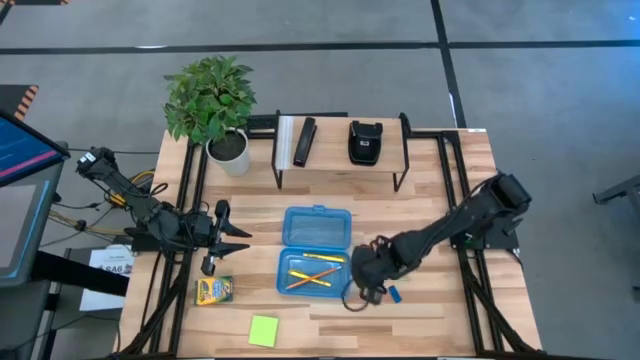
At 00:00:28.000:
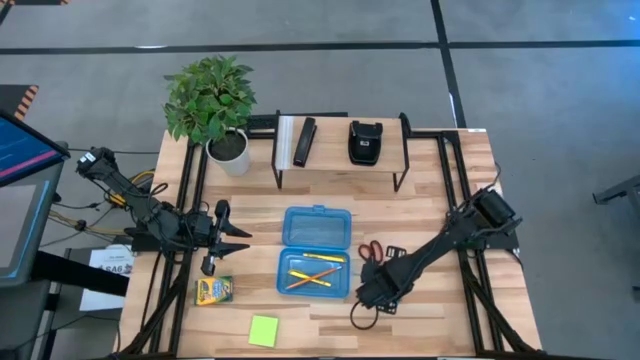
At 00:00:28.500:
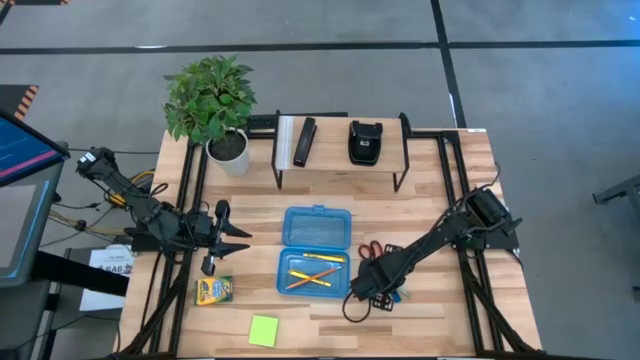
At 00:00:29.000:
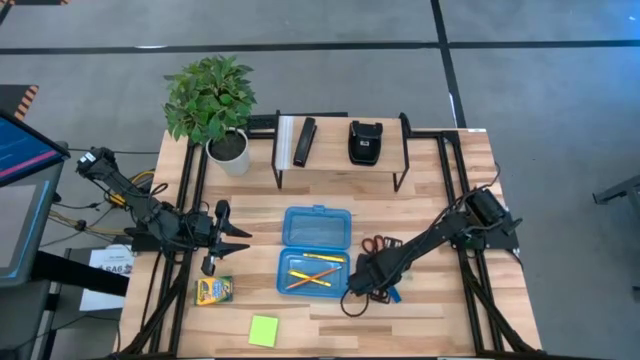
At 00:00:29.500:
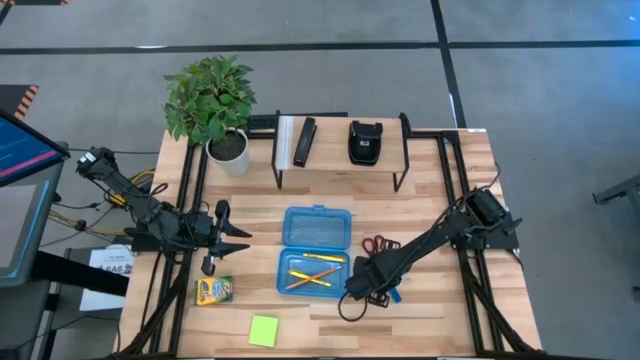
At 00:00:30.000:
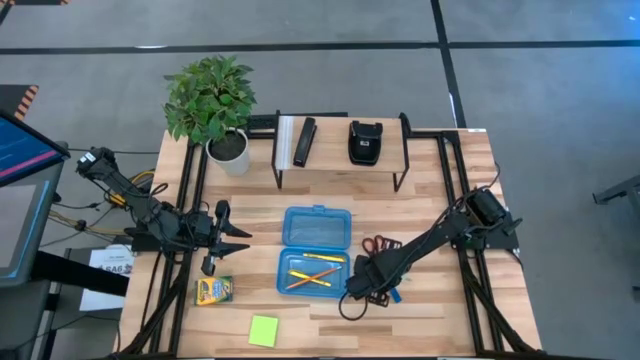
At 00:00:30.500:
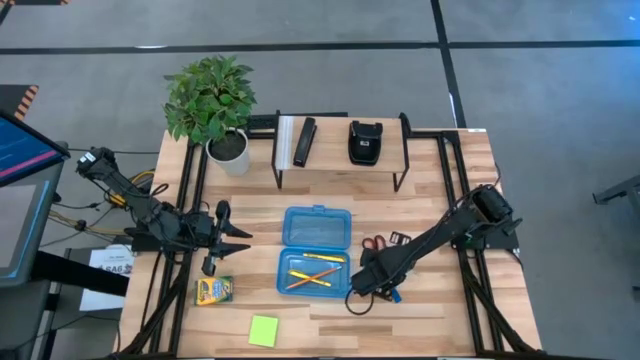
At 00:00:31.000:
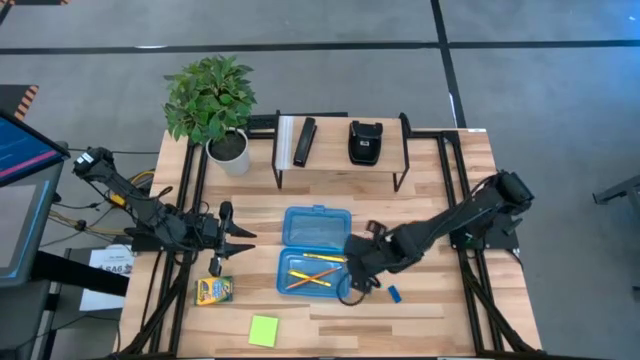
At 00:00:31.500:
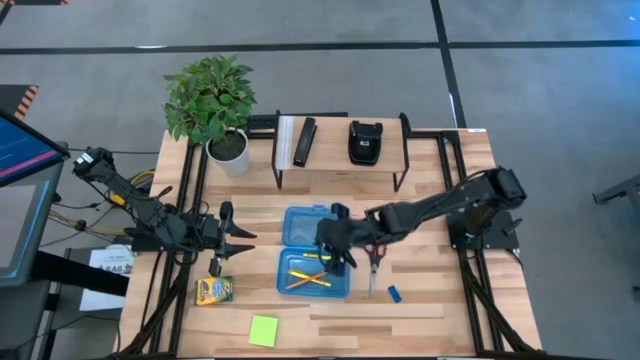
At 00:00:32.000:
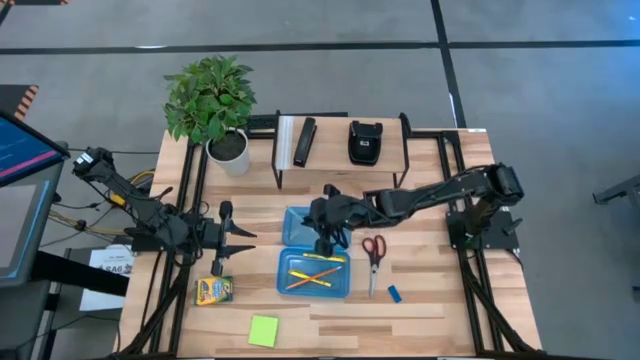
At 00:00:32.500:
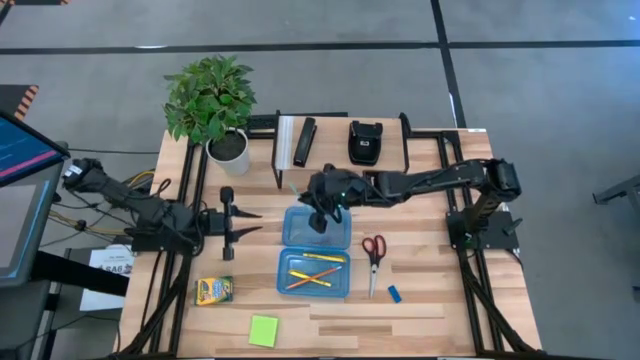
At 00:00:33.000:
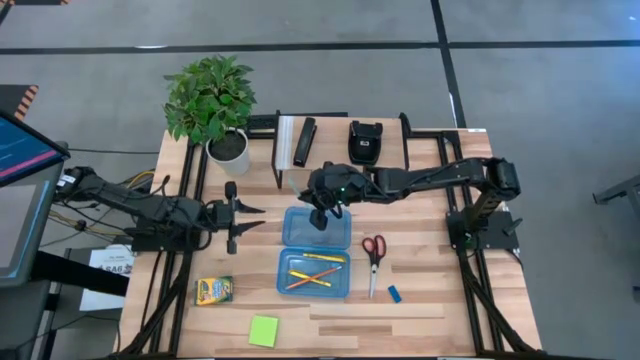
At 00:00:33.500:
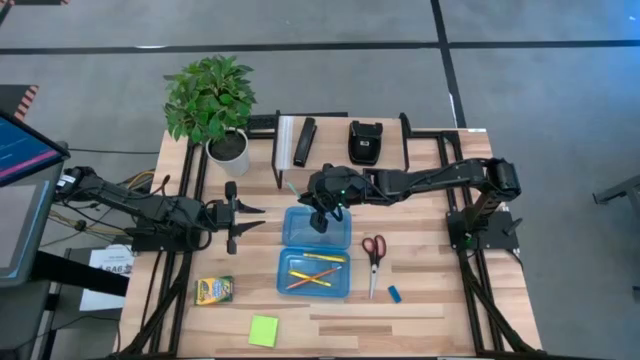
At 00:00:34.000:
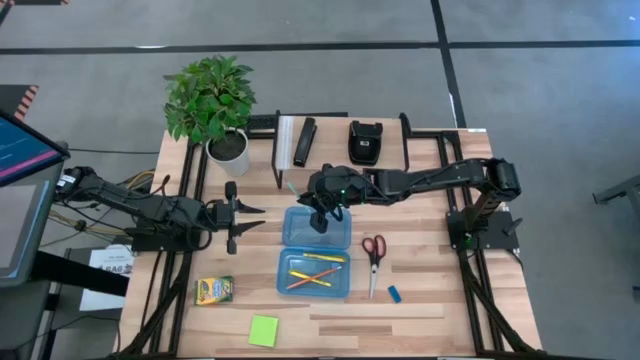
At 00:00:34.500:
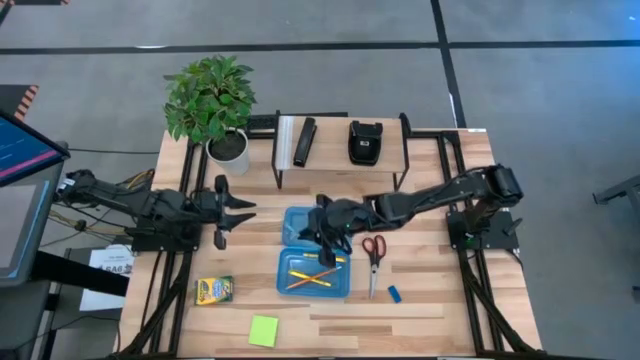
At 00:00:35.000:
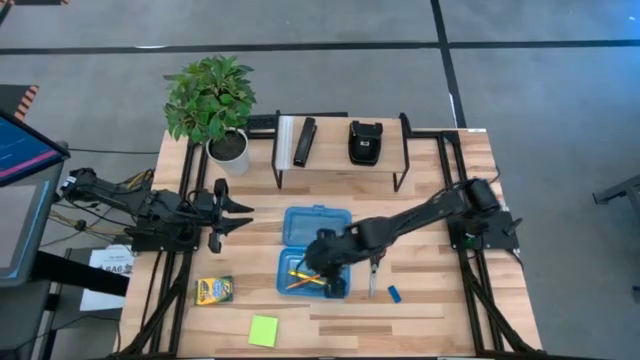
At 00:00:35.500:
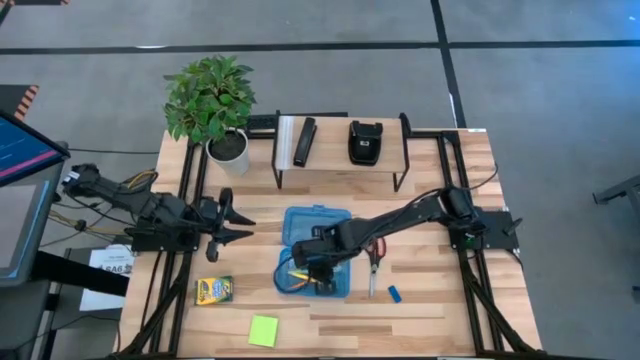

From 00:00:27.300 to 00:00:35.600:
Task: Pack school essentials
Put the light blue pencil into the blue pencil box

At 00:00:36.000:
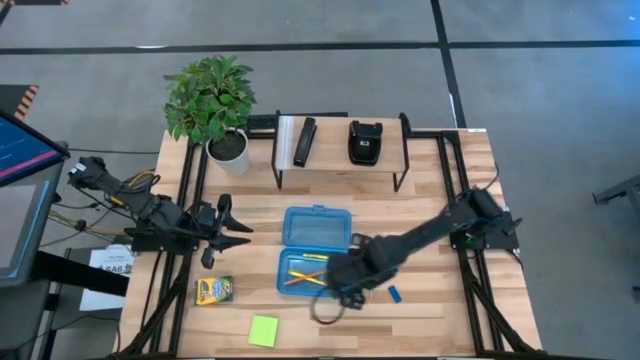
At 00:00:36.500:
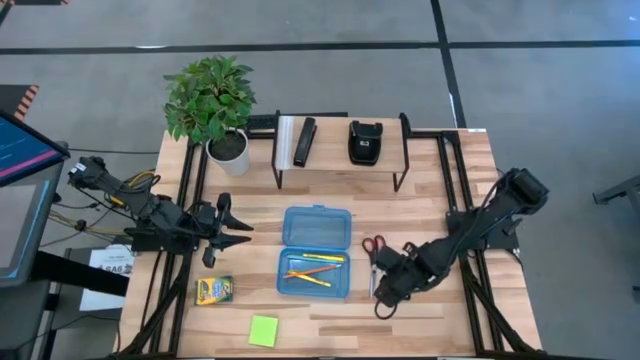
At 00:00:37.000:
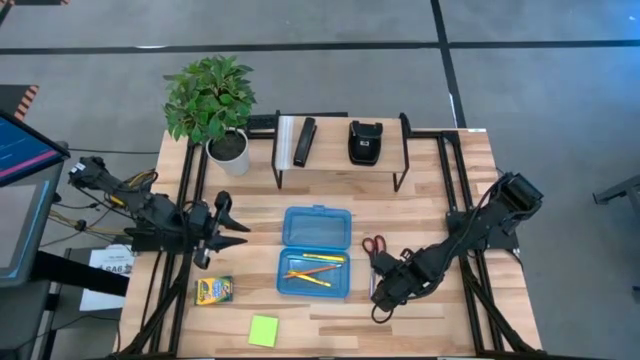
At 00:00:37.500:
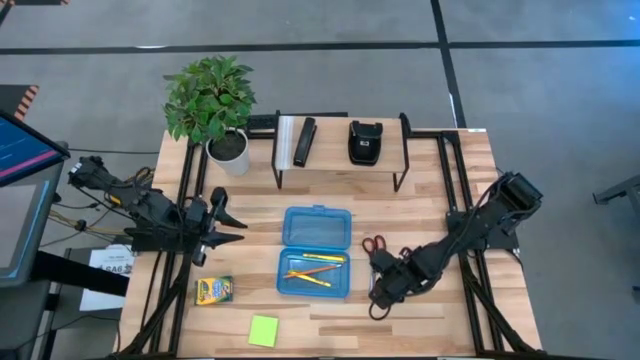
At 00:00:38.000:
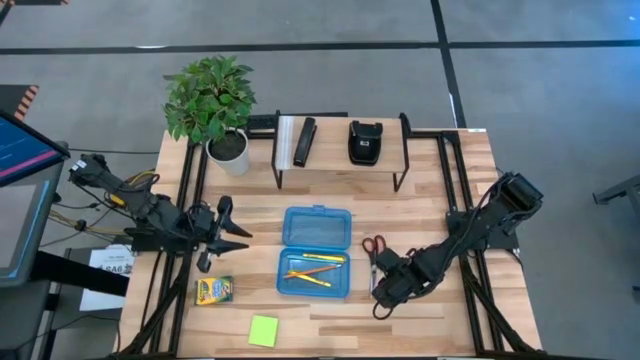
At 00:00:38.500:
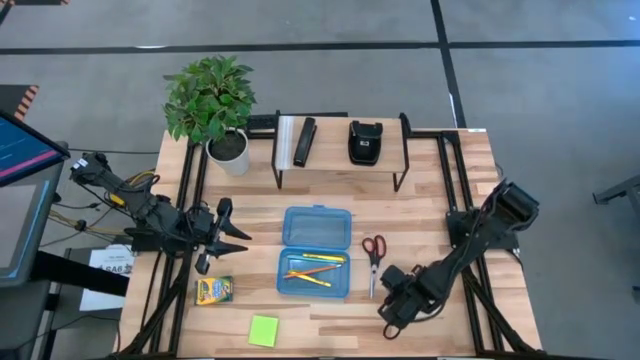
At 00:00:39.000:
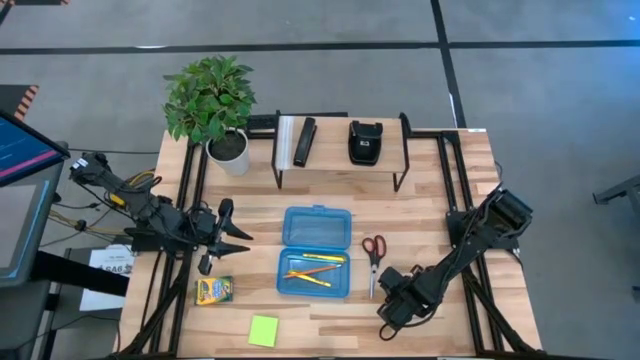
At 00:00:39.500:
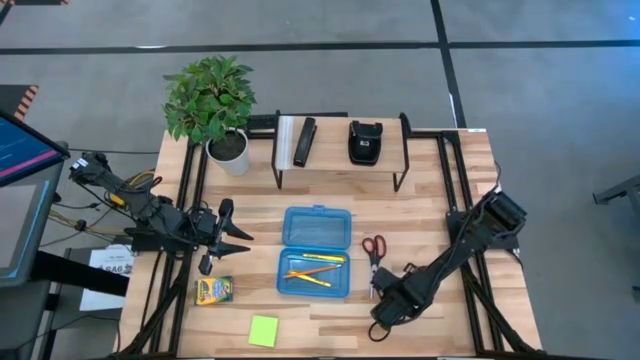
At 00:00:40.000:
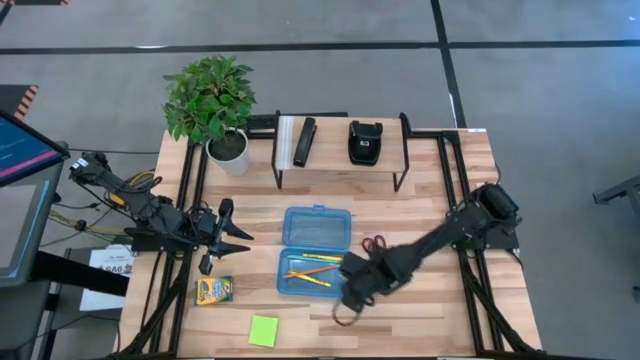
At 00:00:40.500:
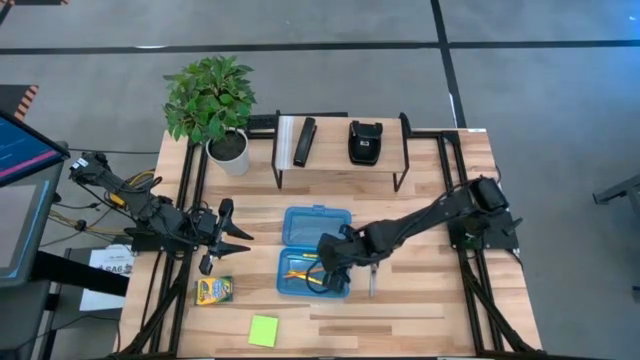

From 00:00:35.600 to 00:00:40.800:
Put the eraser into the pencil box

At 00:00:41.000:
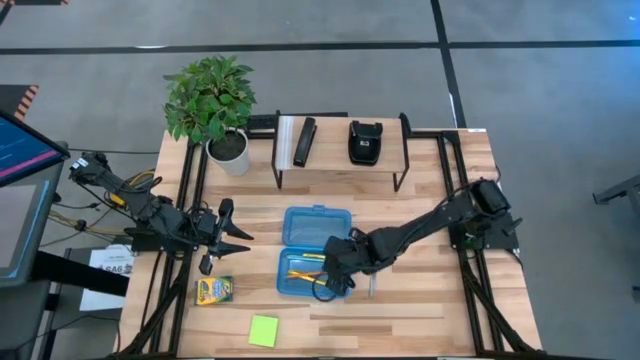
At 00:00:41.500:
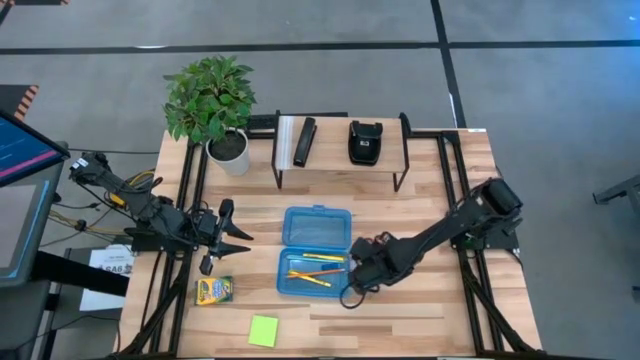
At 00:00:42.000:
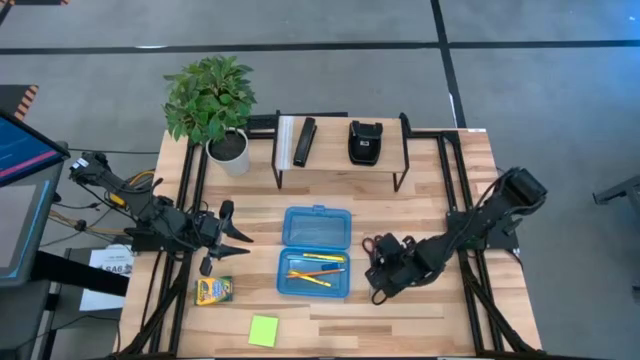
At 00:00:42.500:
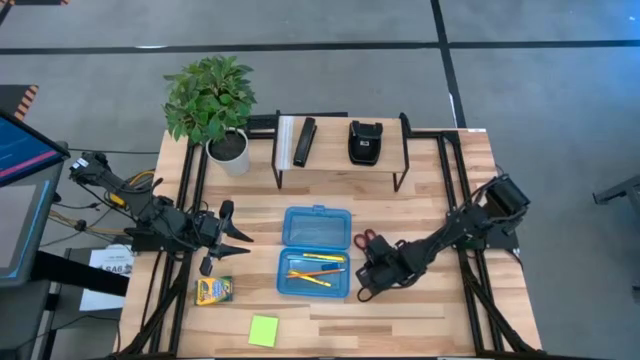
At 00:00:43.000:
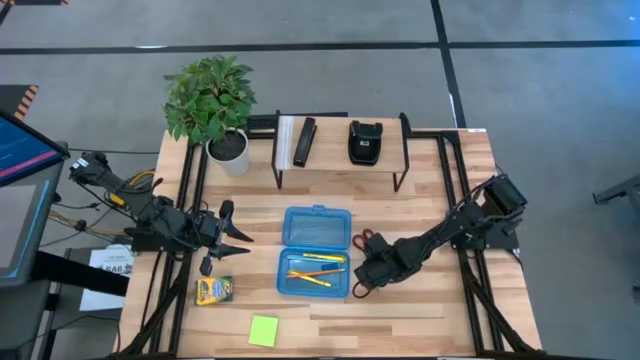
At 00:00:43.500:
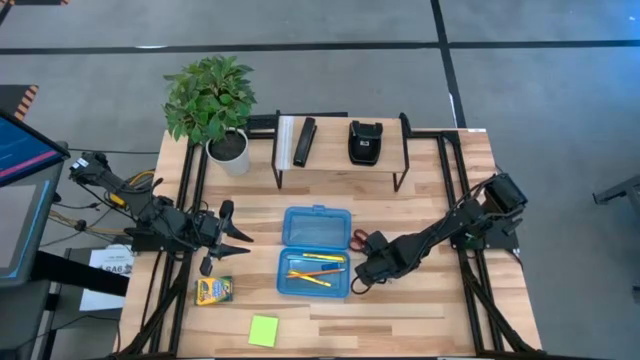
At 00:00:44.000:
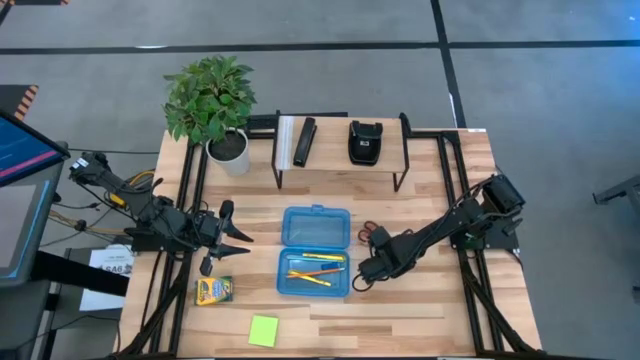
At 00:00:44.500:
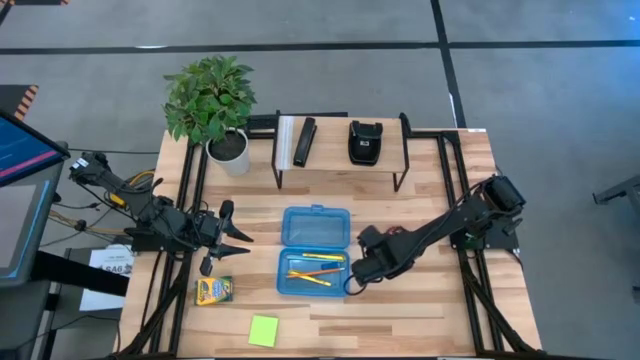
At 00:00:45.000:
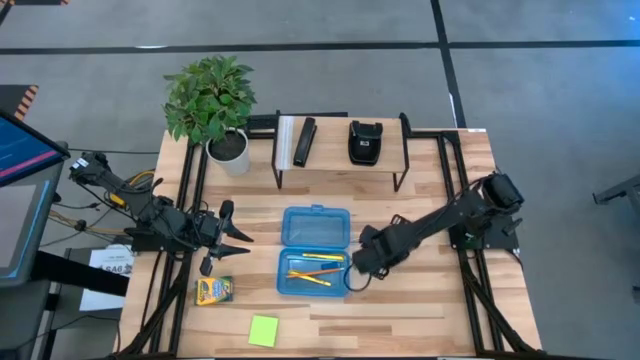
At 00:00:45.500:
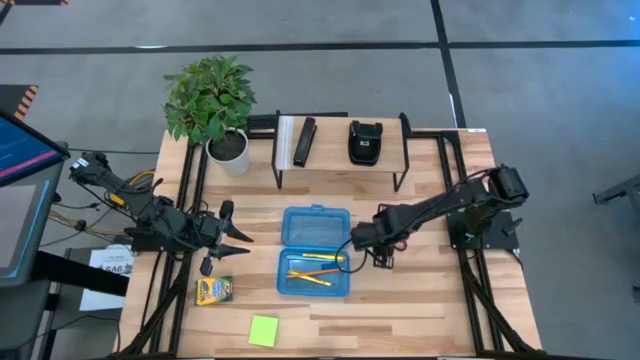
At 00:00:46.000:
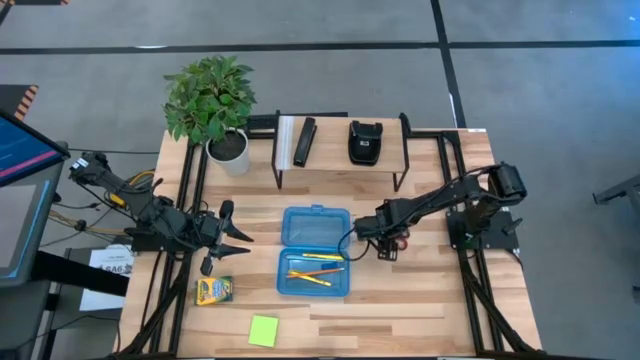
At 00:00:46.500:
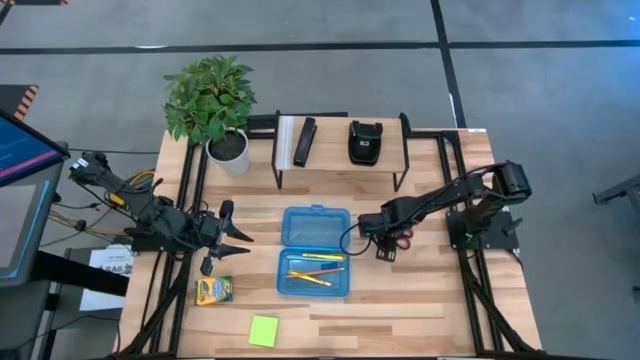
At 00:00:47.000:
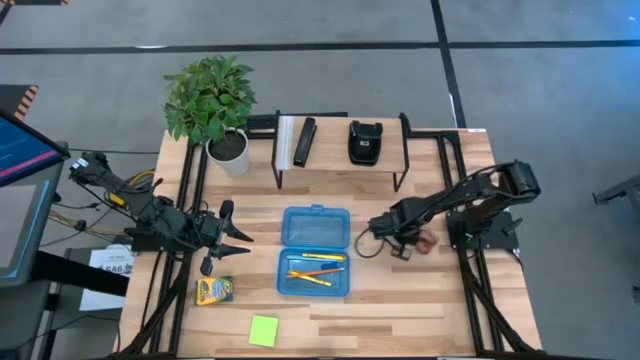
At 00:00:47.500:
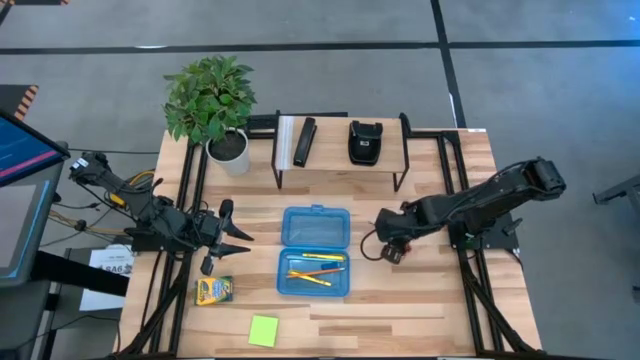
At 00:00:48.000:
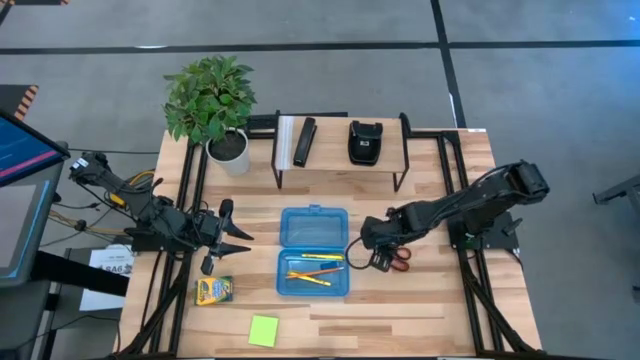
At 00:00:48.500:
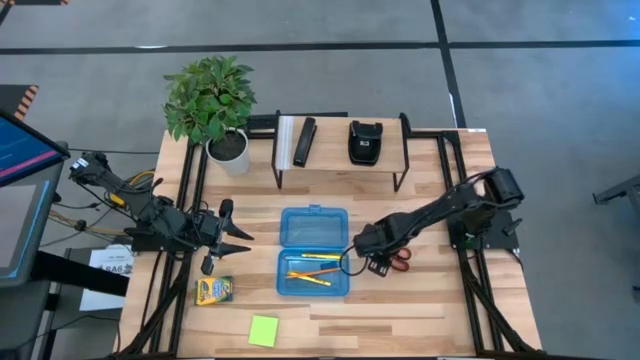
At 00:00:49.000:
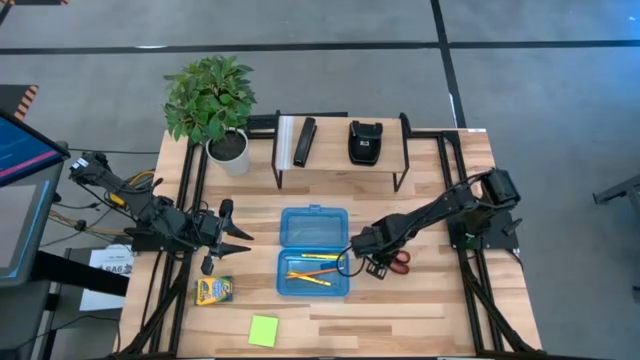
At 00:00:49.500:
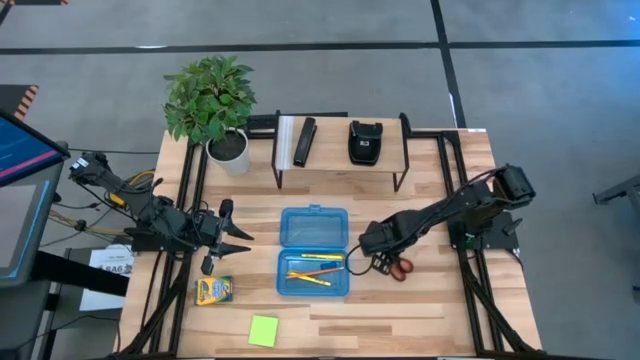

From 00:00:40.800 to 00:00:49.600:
Put the scissor into the blue pencil box
